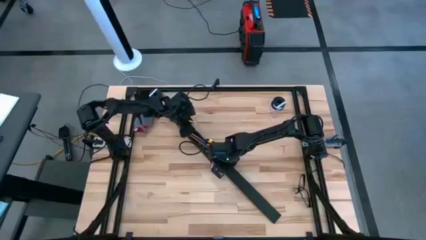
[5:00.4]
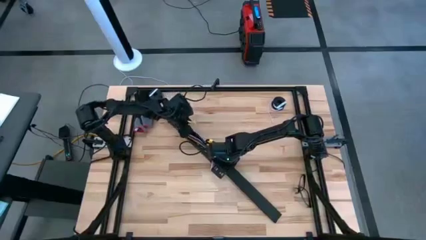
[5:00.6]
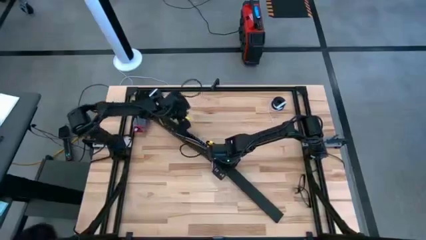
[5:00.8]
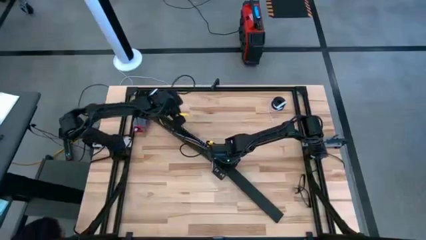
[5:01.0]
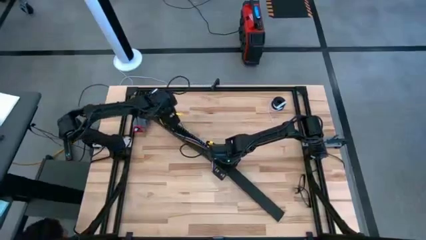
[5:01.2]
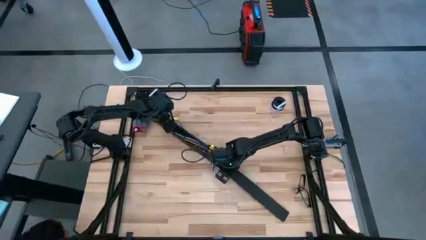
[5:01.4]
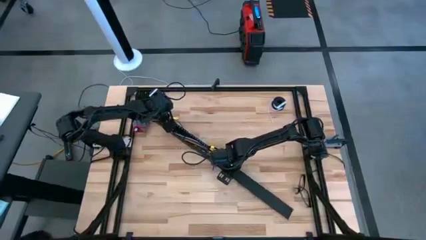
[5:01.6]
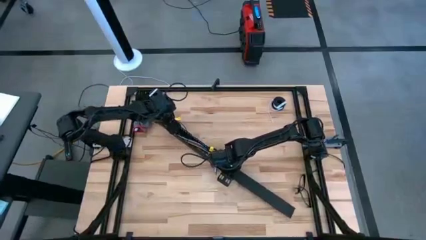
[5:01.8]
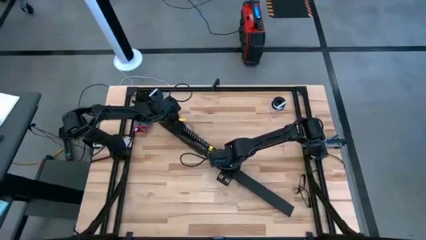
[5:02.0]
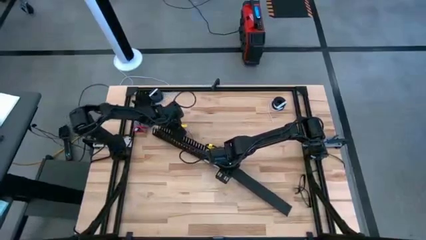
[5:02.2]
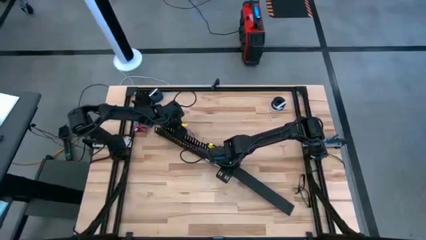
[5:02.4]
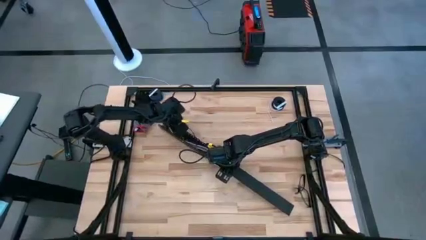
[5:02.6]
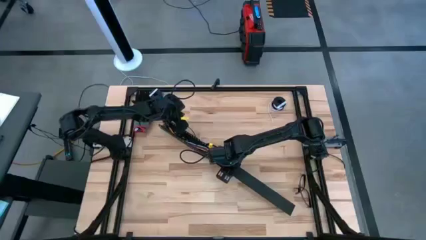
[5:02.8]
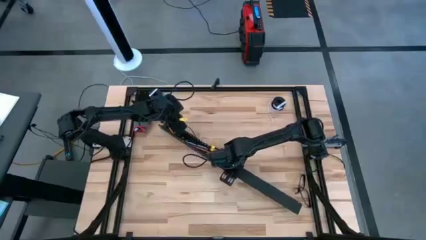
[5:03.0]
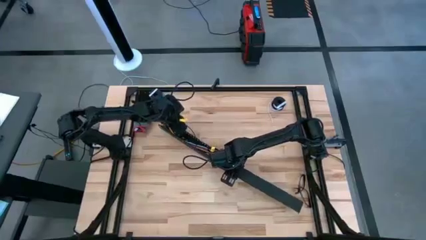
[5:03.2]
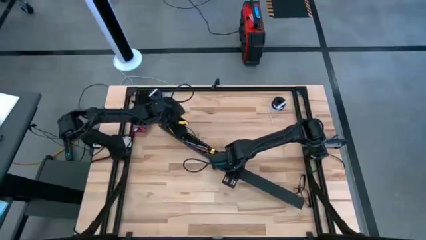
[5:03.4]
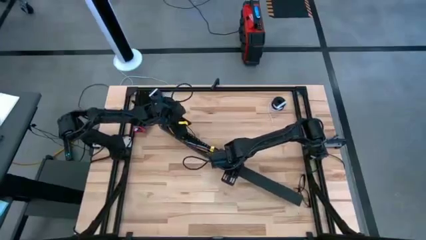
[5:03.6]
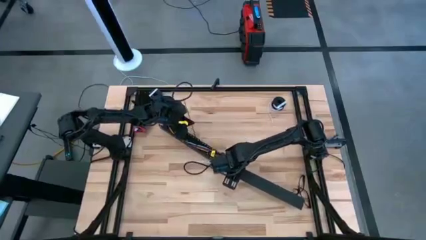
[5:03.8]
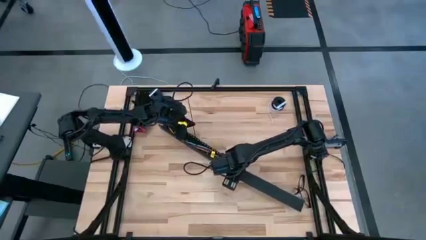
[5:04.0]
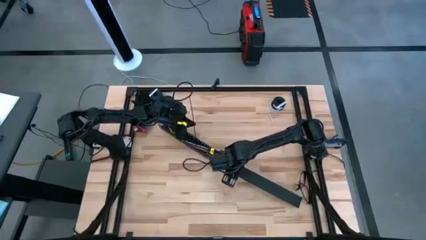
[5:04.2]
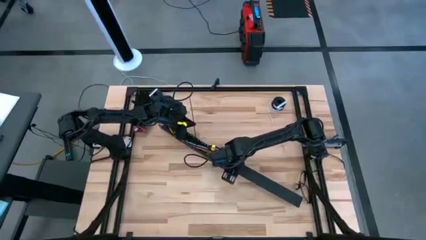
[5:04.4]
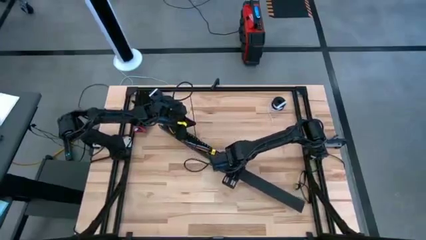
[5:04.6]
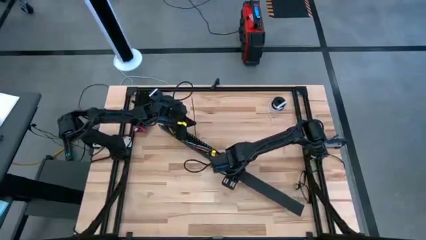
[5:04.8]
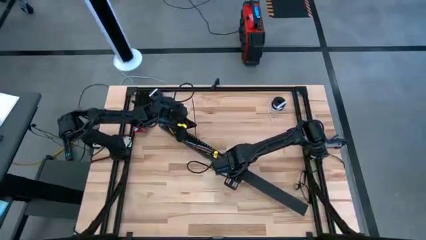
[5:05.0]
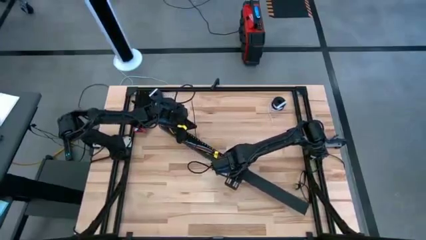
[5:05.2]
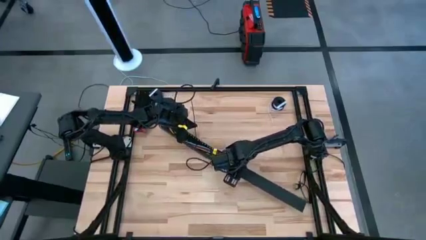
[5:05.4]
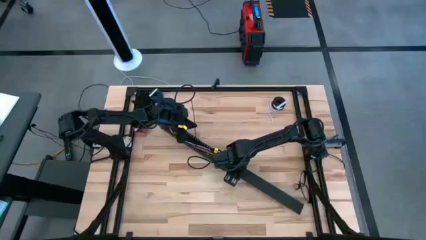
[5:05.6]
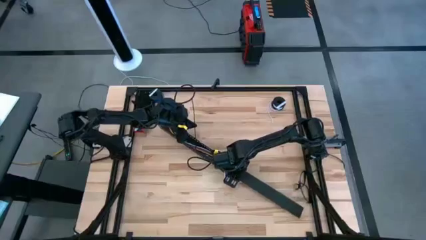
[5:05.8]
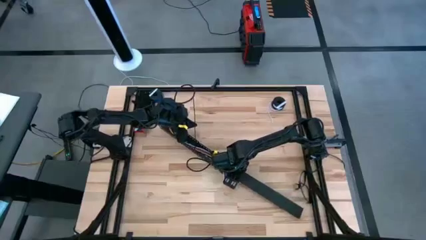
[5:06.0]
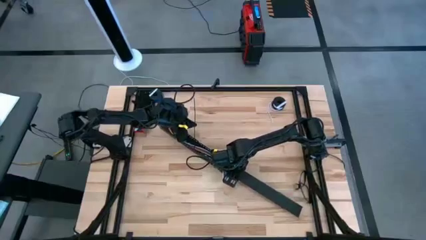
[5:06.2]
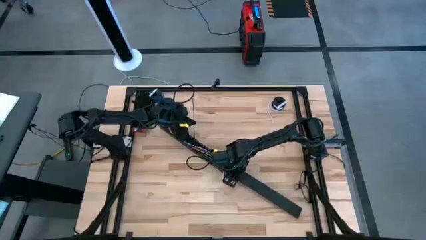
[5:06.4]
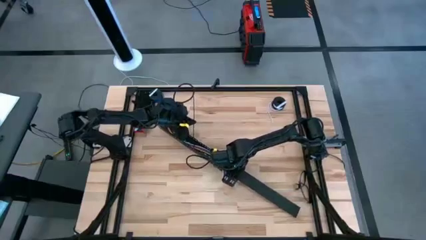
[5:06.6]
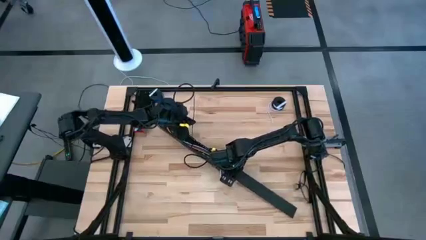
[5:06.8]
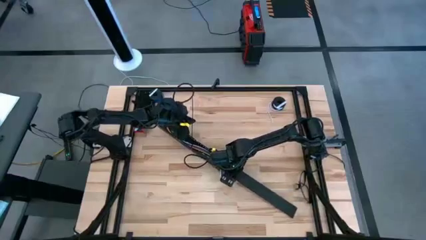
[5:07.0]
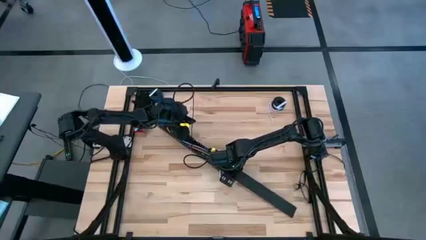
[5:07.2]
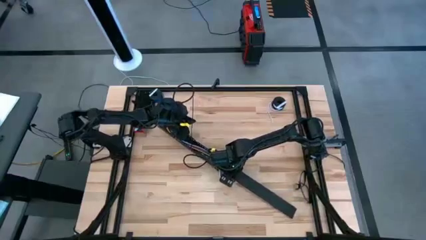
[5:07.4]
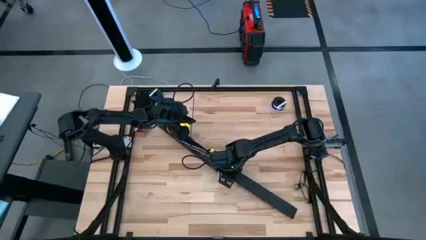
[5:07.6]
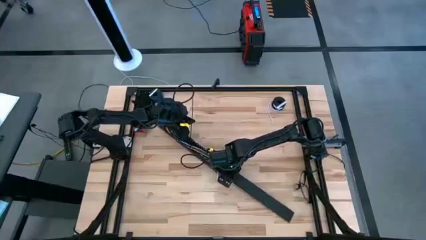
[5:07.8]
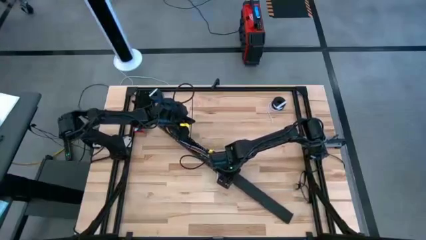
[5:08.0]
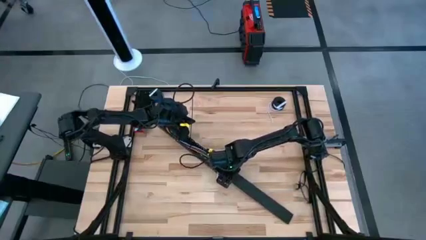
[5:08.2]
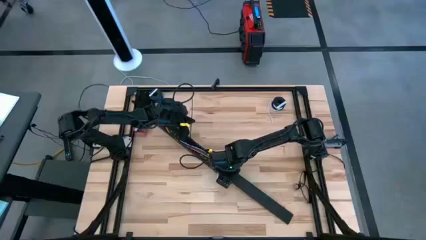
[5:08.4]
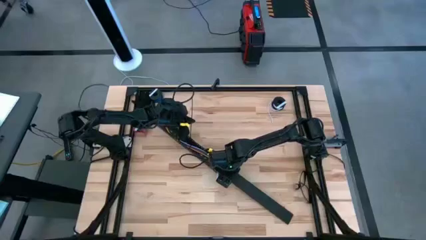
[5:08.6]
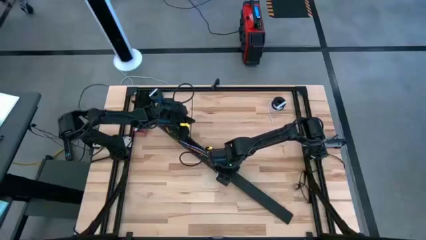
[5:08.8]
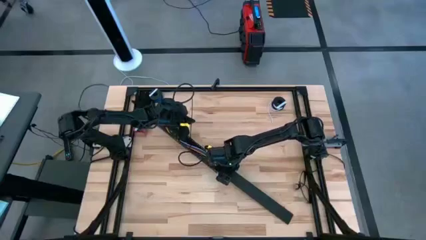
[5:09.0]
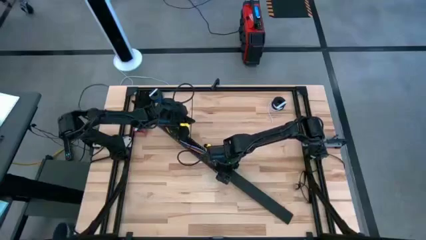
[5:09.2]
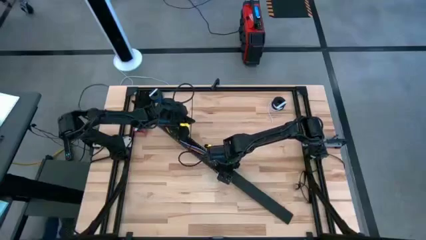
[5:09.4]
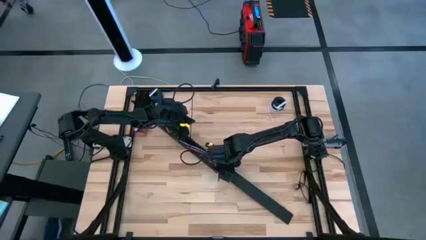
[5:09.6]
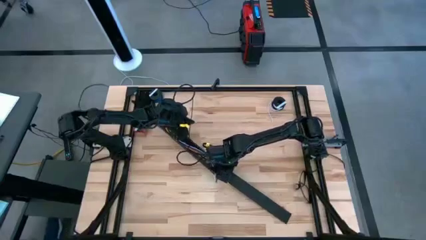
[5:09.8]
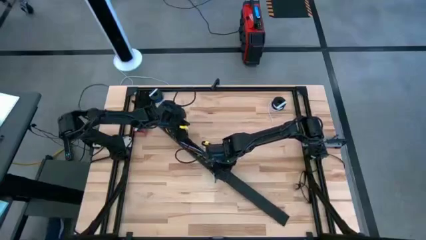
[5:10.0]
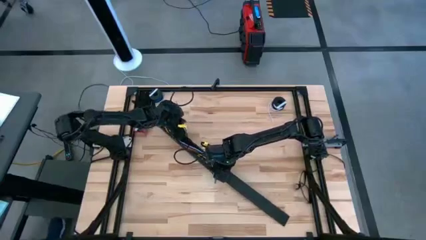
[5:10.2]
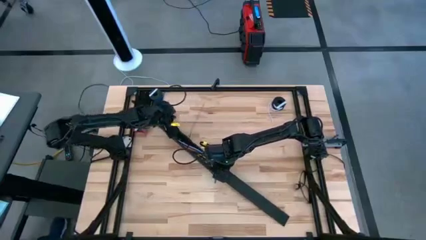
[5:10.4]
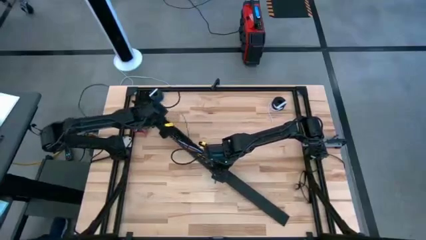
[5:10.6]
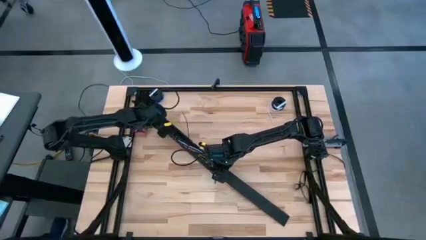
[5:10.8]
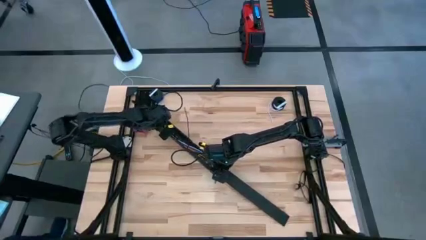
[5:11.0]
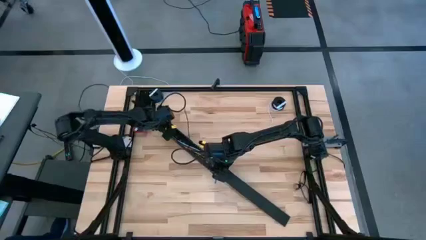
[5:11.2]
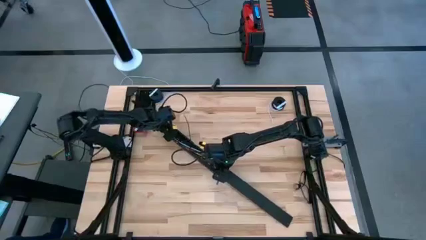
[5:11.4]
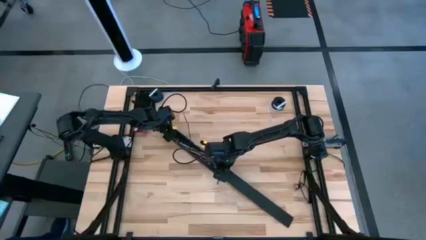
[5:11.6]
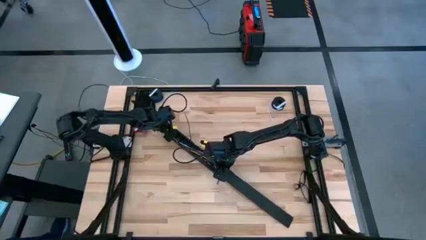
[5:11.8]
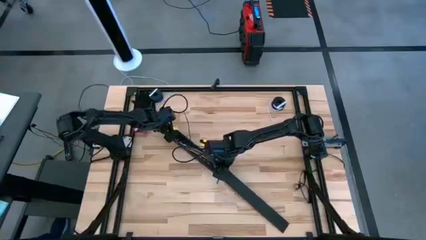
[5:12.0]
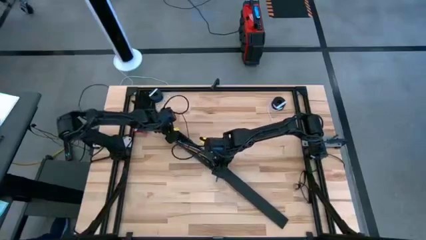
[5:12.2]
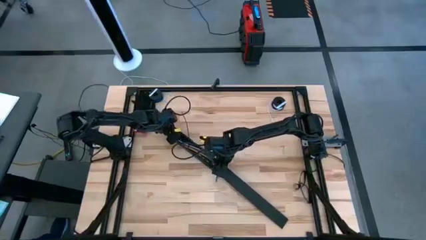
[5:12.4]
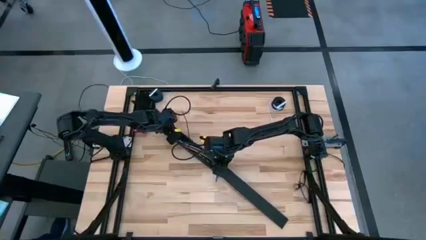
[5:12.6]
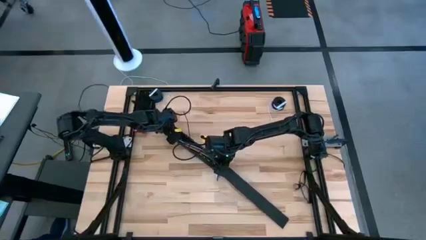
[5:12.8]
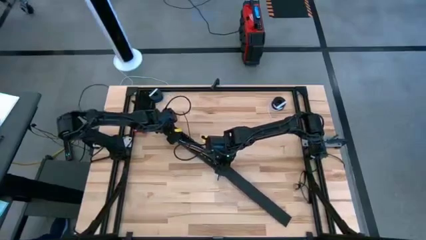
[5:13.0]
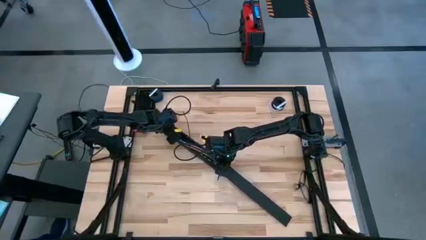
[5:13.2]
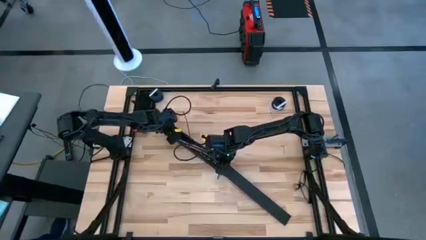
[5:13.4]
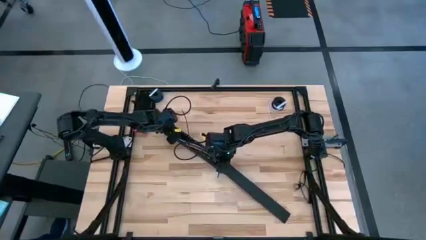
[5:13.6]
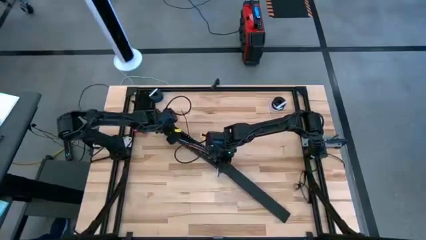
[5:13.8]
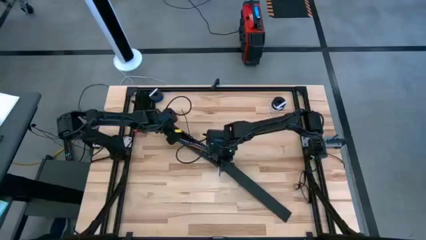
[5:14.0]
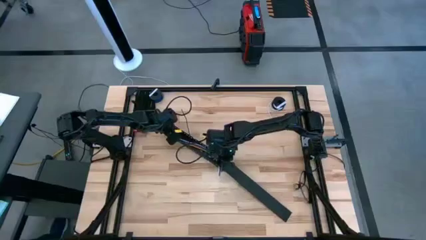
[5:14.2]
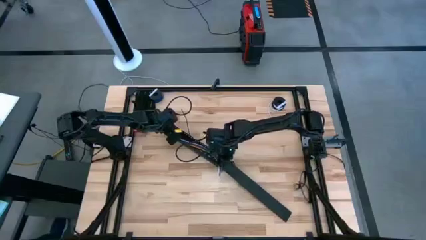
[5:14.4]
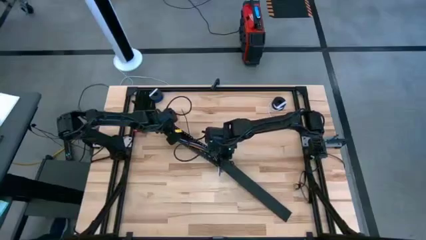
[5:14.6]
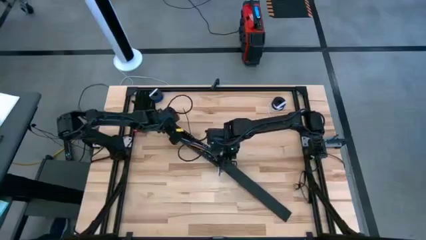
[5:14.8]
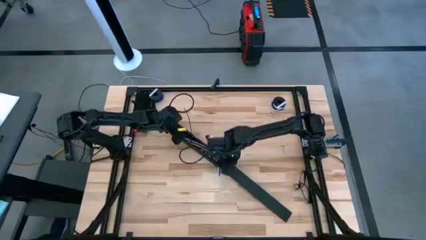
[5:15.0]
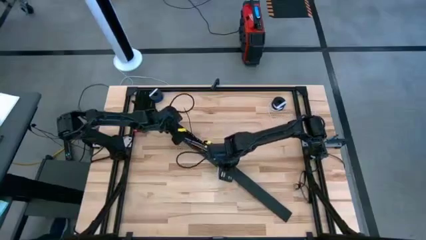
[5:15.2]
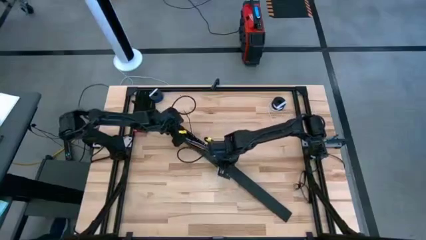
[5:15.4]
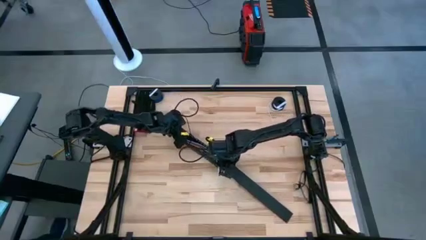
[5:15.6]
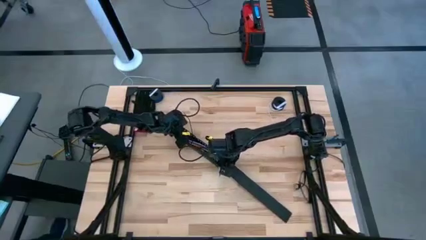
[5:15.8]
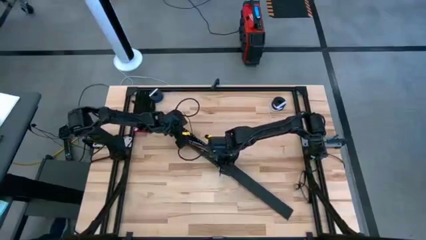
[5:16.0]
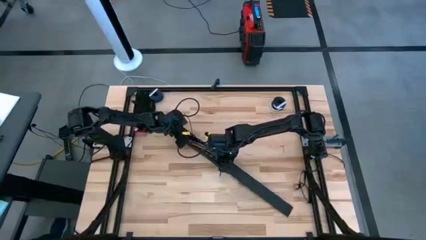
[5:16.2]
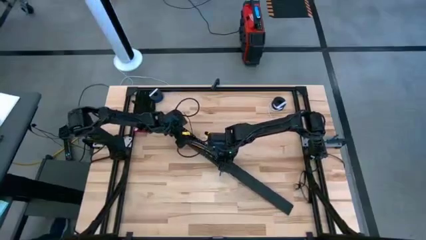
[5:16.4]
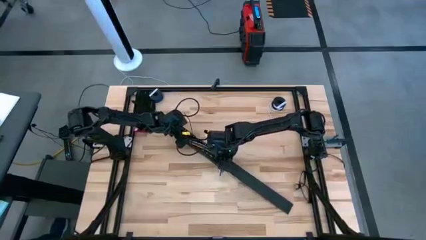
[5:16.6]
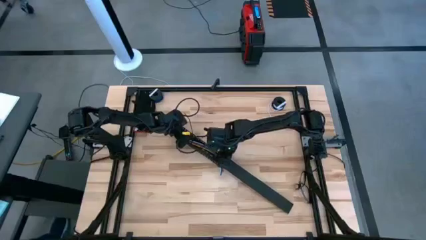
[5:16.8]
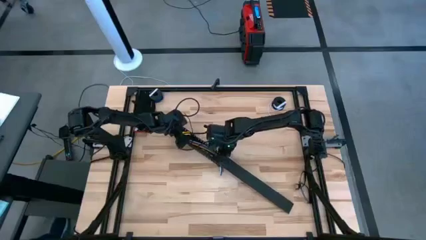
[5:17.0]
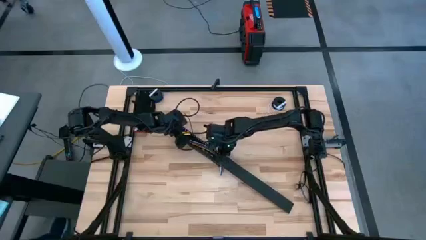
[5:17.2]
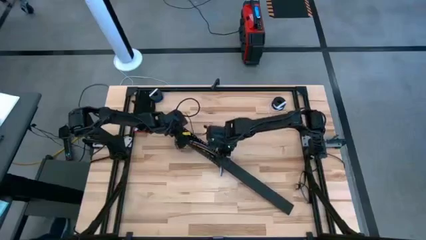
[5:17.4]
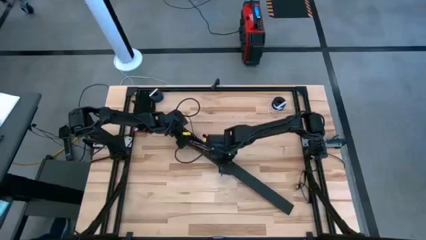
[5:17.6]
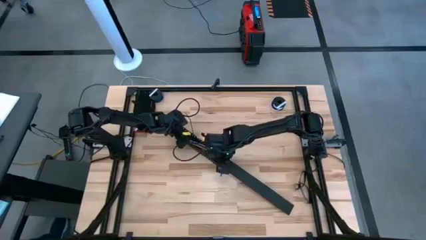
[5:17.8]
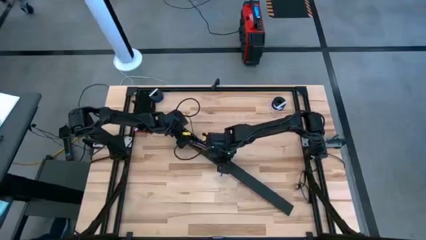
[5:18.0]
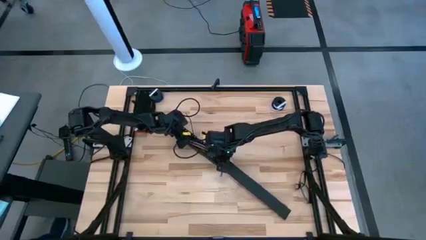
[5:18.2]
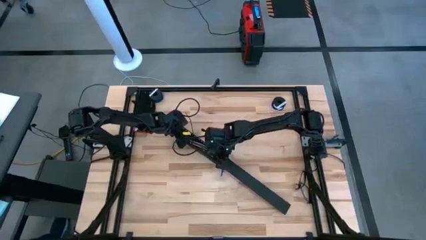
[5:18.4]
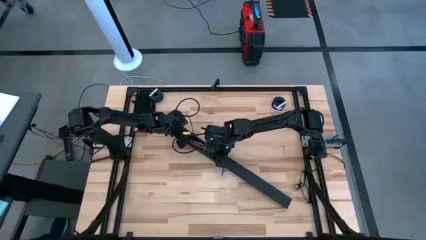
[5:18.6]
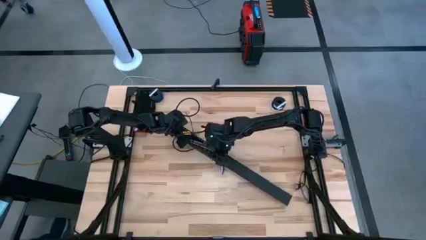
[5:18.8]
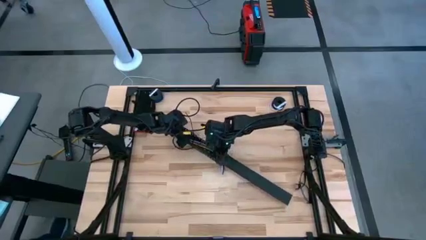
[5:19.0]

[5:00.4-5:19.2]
Task: Ziptie cables
Close the black cable duct
